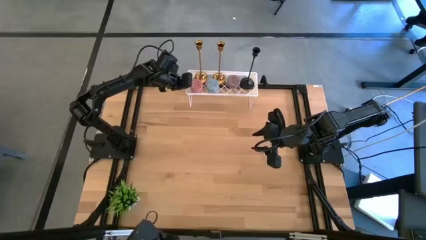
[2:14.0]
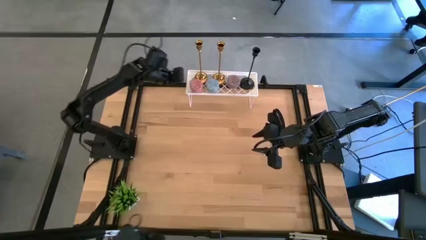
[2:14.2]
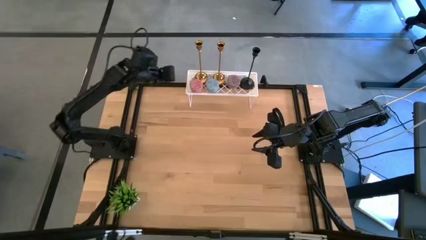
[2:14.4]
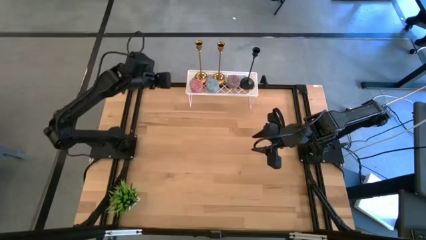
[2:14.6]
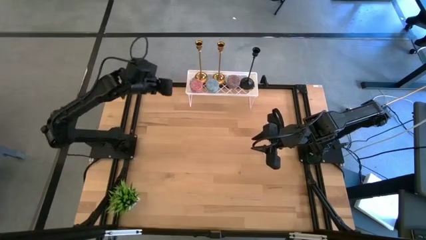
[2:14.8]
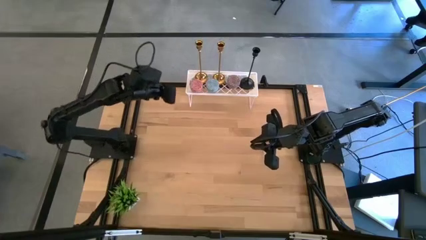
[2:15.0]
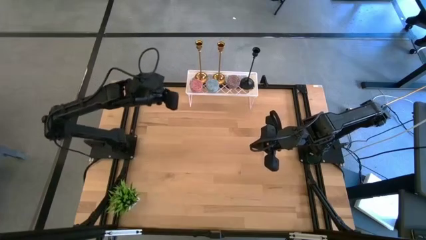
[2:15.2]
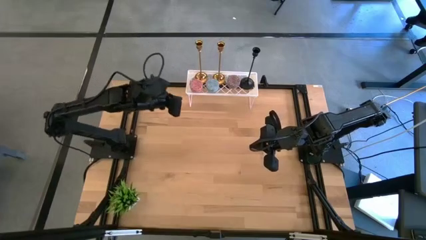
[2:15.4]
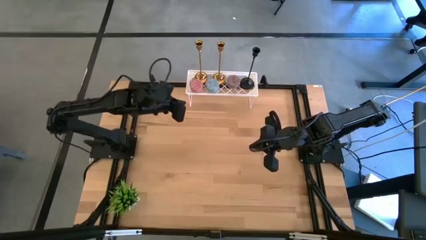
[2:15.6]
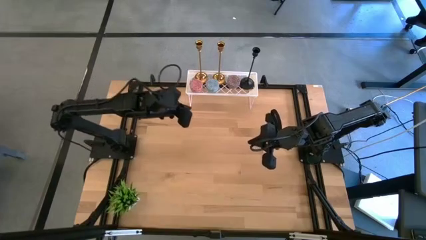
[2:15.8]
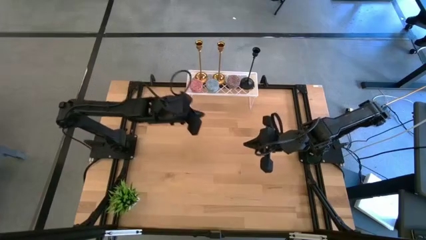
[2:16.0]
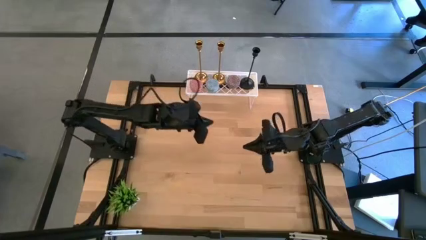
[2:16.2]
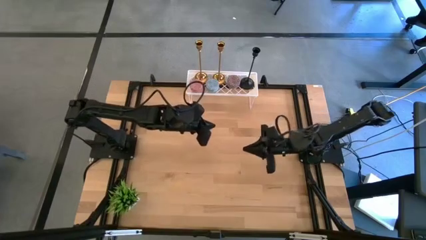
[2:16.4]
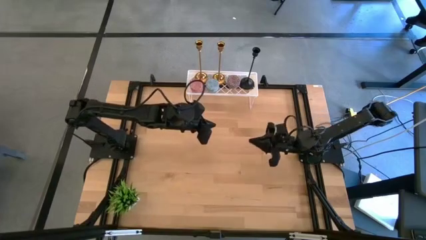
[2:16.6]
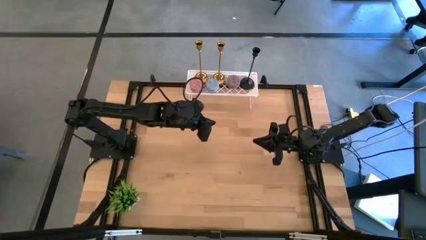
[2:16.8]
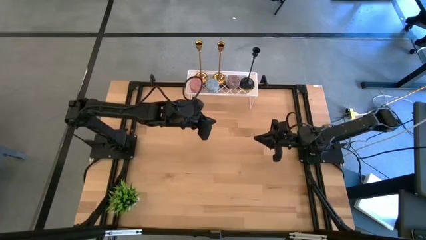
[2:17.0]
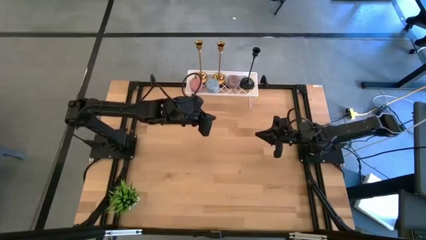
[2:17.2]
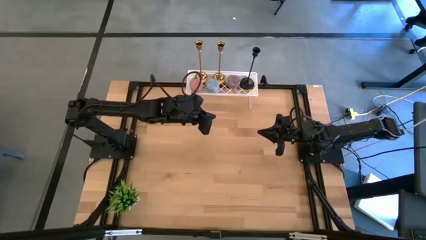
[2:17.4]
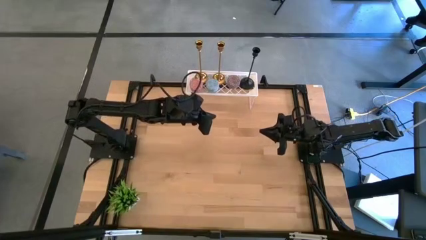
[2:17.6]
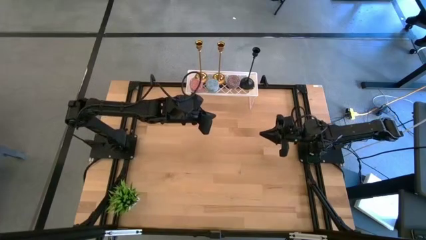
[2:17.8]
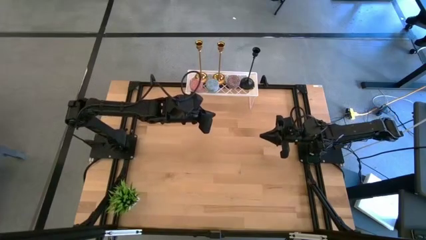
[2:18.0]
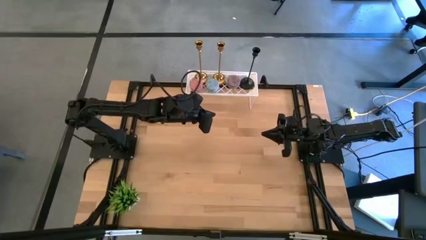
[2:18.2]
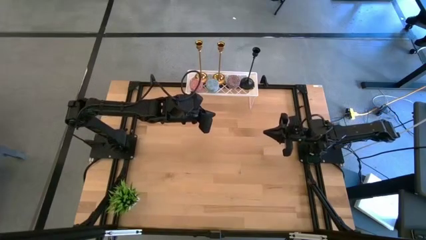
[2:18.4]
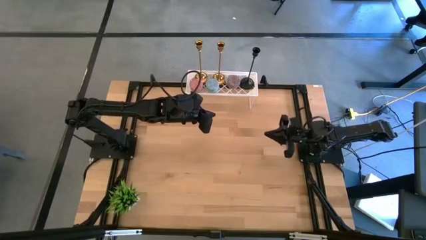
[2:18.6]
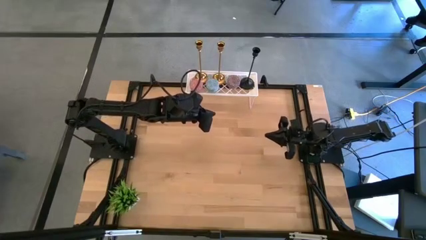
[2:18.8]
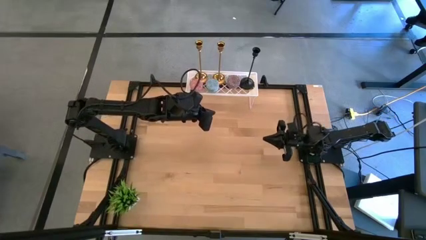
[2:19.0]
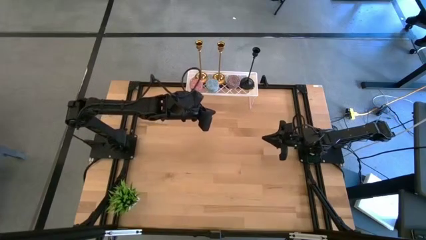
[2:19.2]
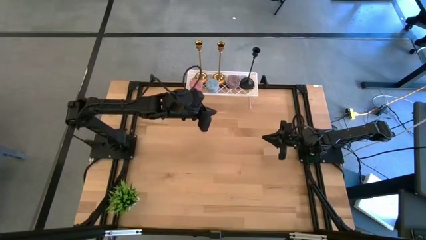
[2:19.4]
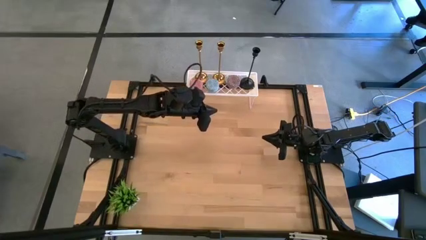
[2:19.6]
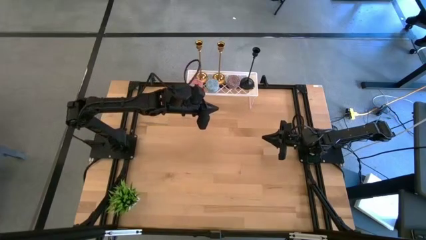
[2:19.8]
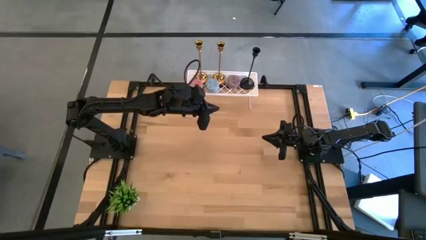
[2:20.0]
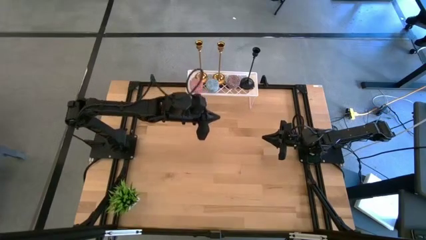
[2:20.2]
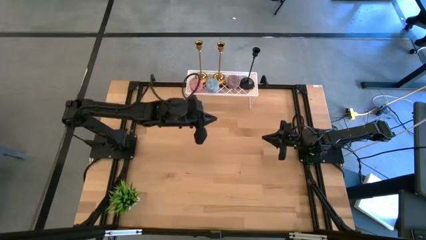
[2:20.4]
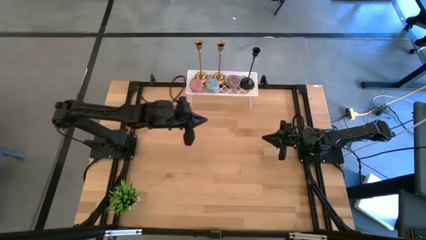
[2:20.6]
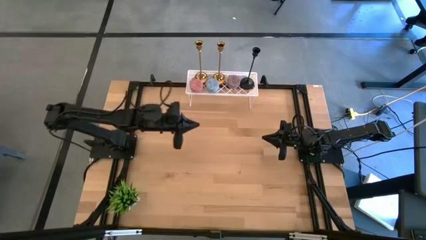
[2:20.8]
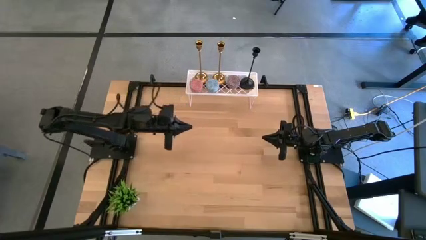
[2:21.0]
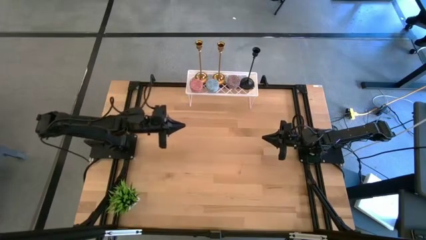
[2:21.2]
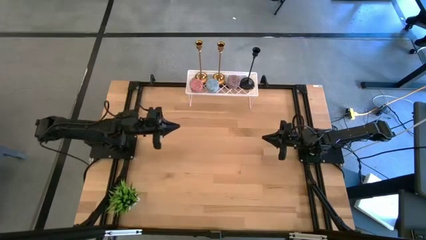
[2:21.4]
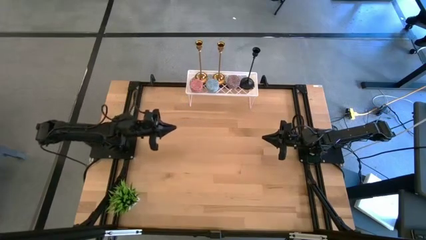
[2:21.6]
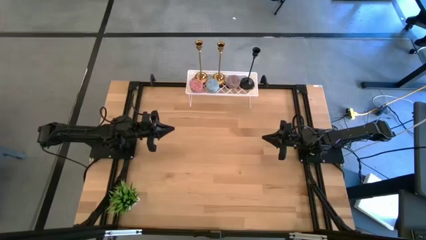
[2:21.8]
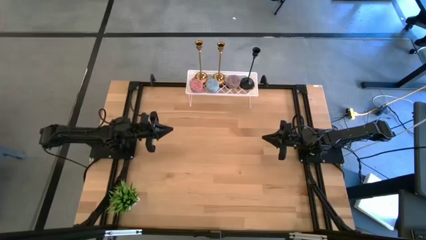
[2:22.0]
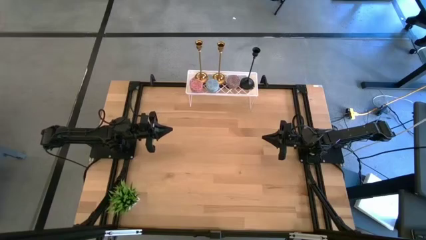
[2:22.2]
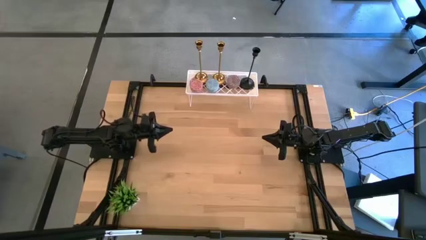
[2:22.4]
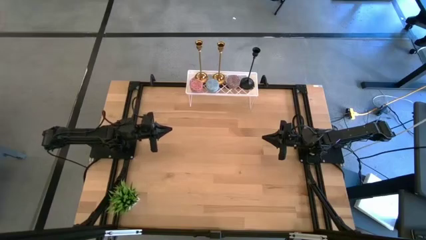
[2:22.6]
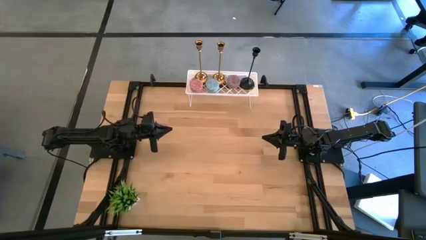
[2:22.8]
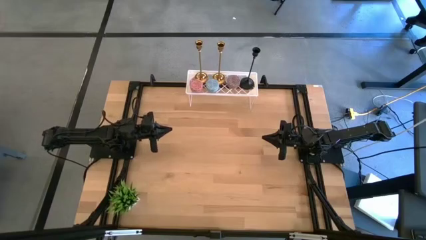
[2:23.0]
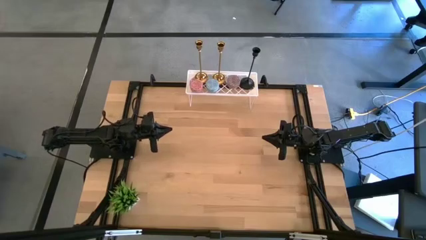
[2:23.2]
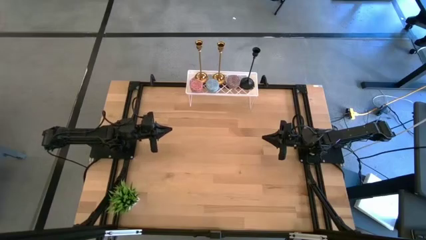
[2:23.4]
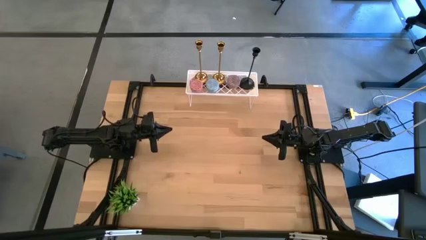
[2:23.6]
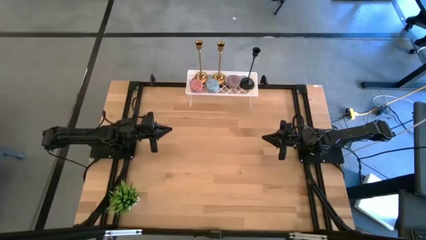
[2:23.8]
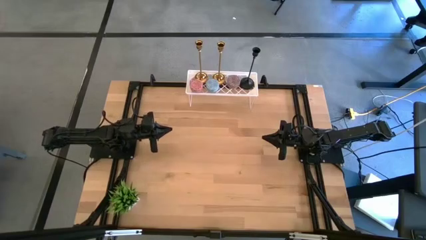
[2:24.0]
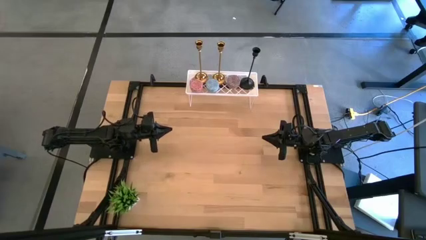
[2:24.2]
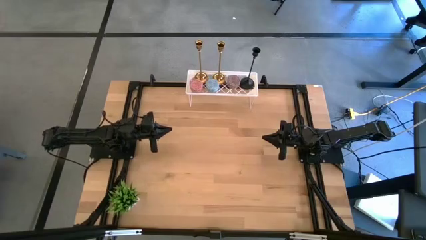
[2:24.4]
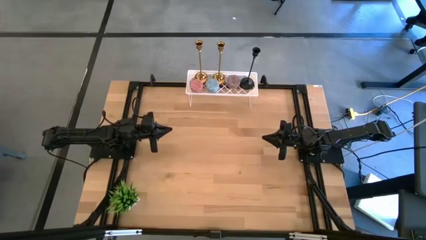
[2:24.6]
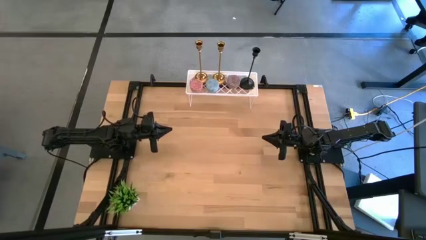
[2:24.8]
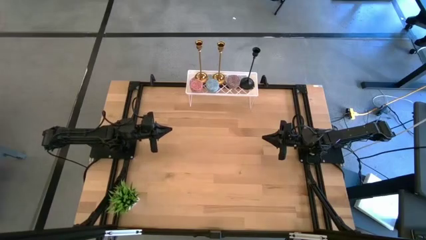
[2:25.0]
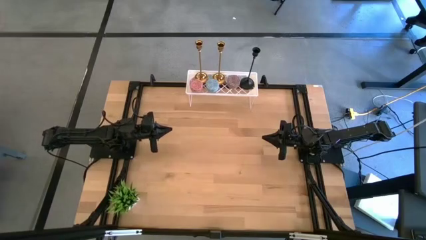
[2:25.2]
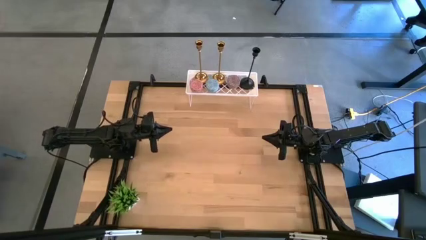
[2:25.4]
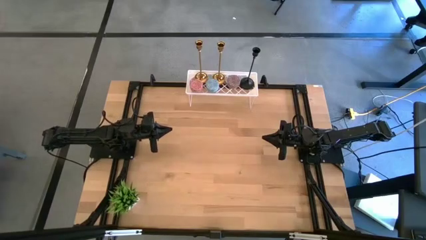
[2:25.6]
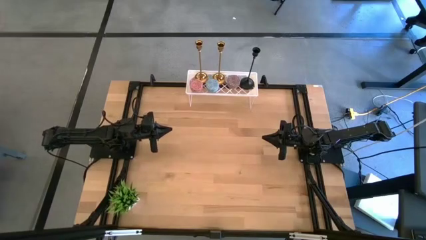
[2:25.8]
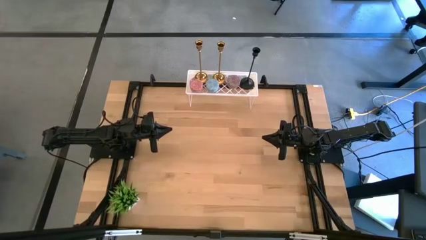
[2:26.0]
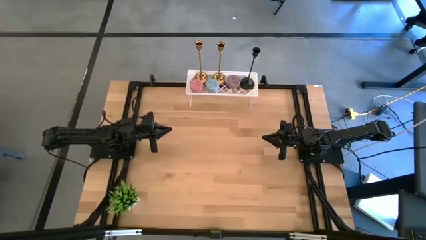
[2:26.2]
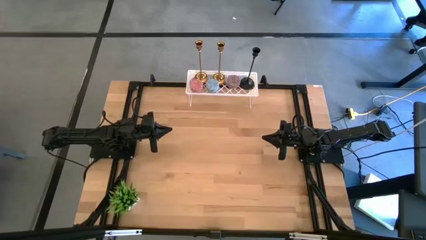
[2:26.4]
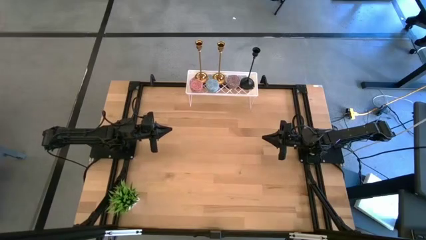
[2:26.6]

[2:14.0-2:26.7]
Task: Pick & Place candle stick holders
Return to Home Position
